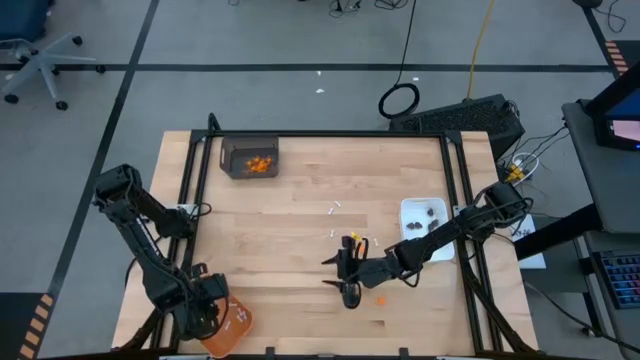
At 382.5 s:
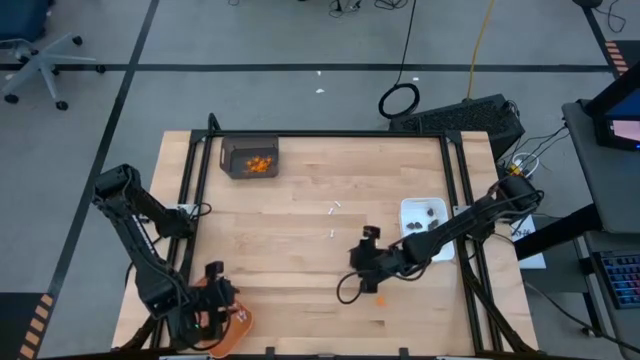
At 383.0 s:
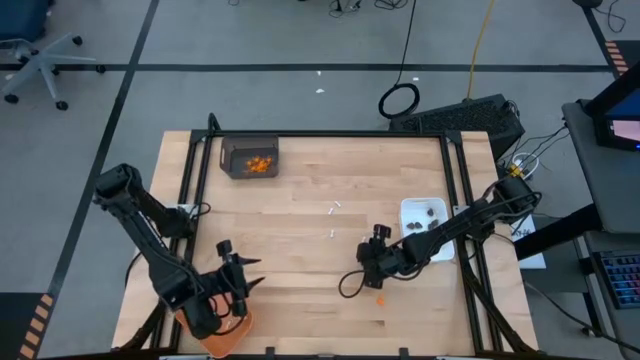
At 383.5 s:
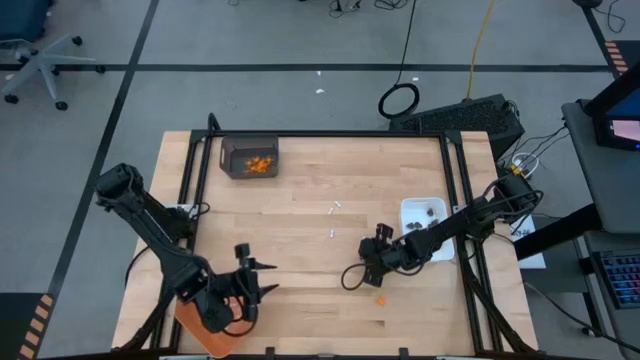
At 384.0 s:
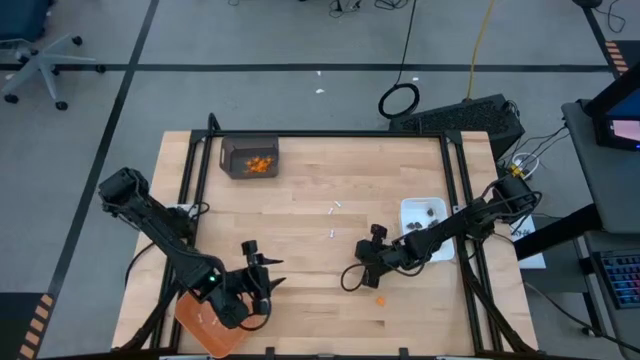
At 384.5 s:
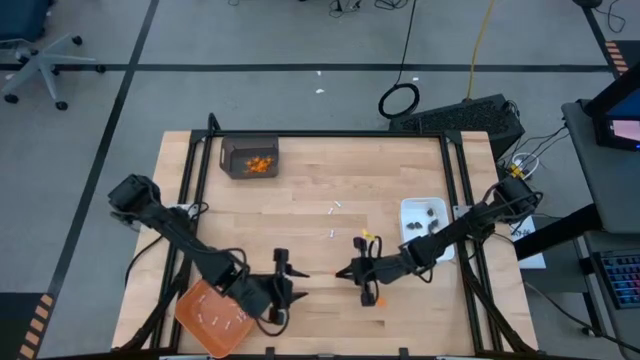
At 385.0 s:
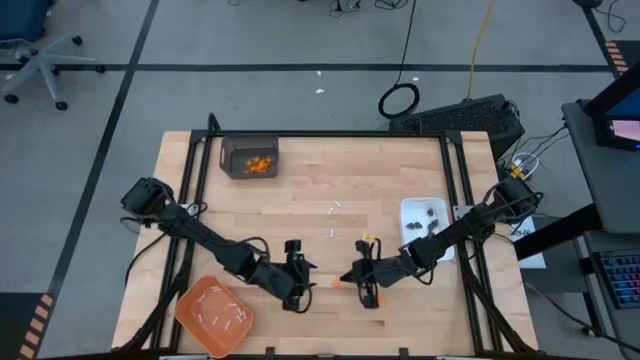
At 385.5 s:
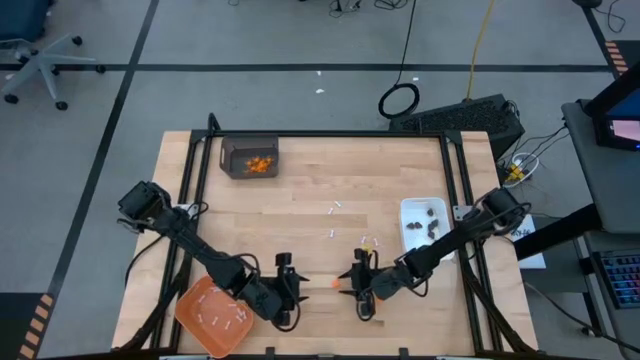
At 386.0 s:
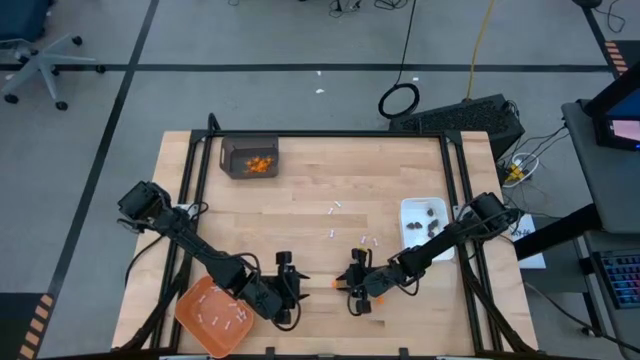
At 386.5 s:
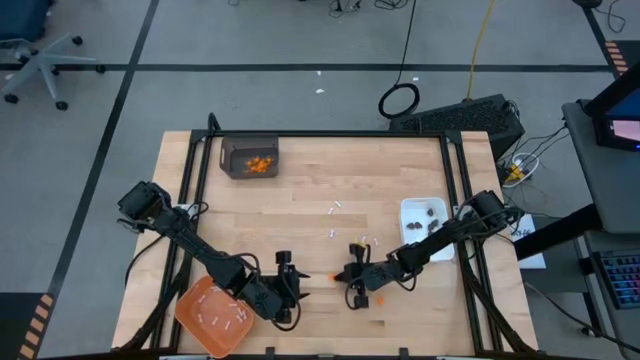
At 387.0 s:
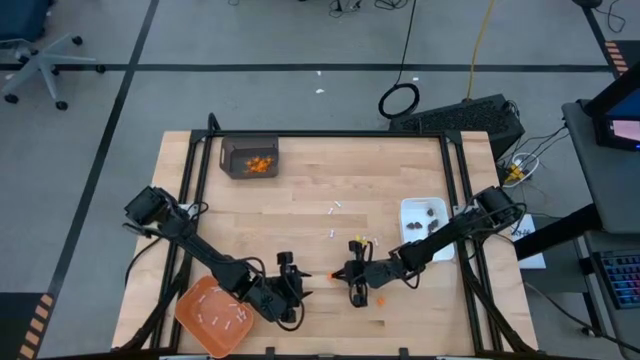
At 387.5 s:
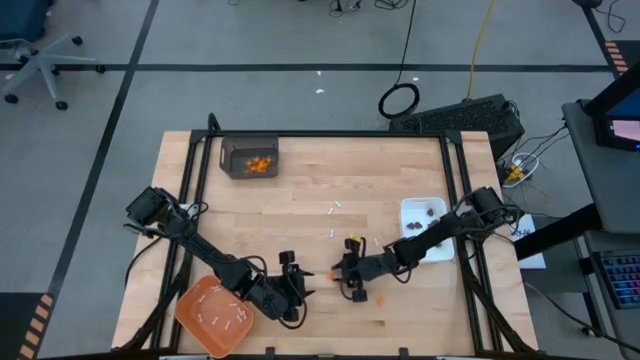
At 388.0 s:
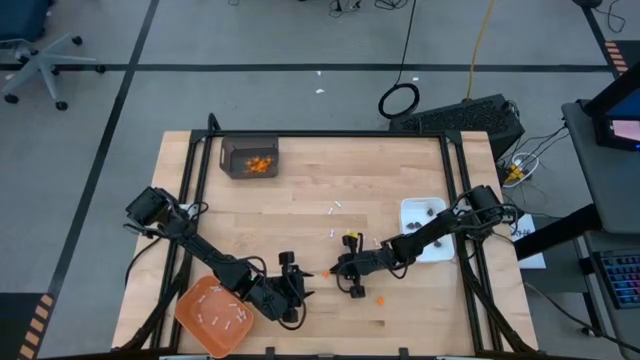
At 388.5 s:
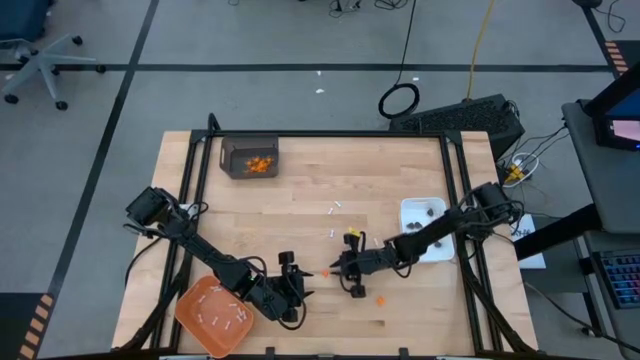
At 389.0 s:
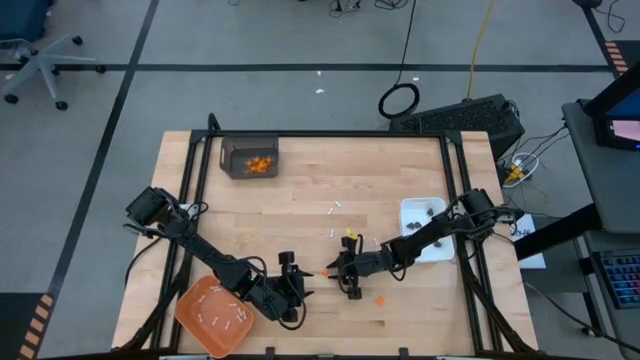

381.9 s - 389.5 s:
Task: Sort Halloween decoration
Put the orange spider toy into the black bin

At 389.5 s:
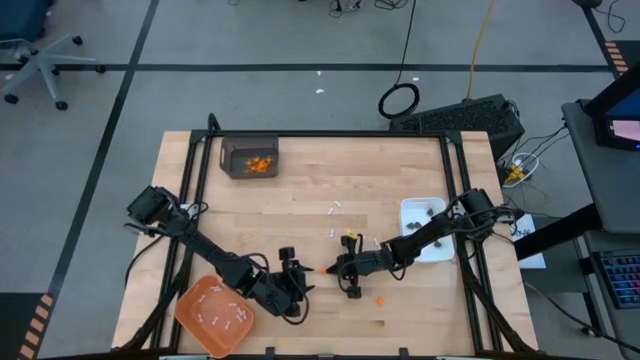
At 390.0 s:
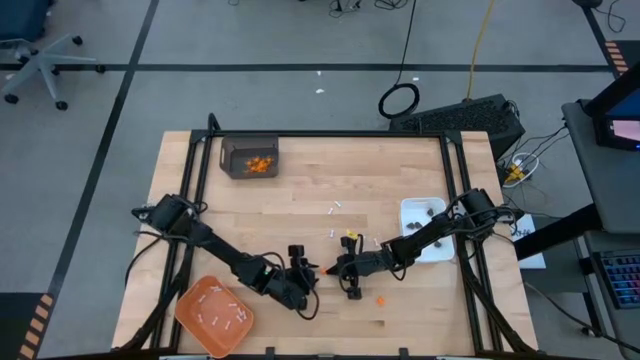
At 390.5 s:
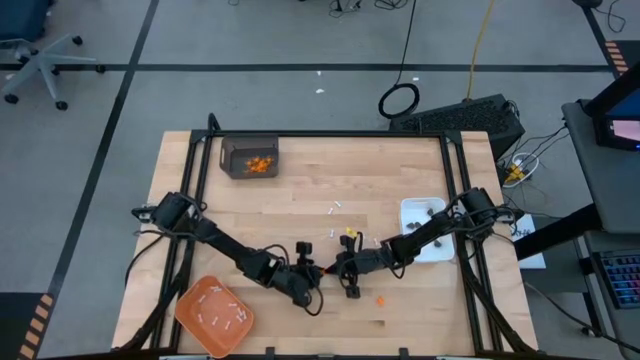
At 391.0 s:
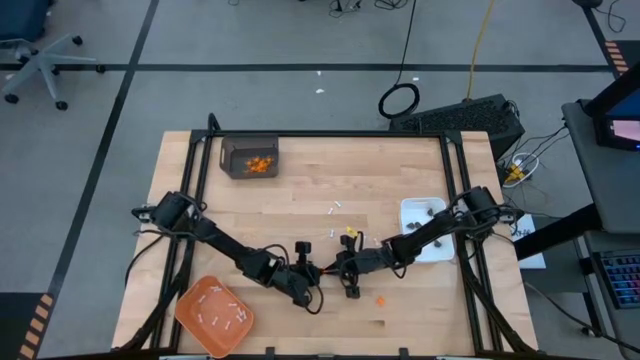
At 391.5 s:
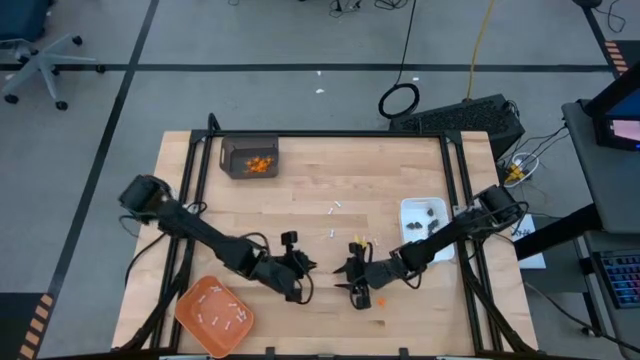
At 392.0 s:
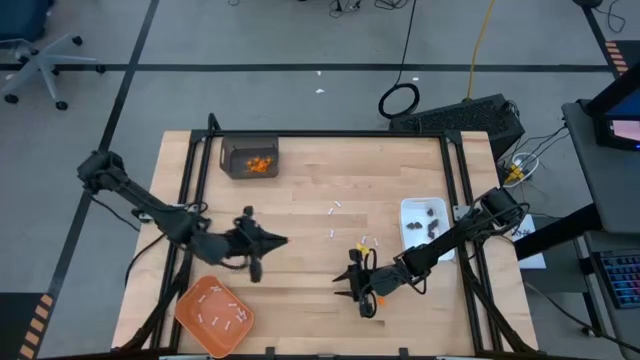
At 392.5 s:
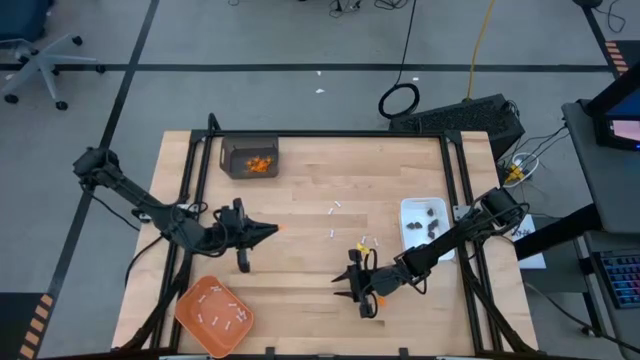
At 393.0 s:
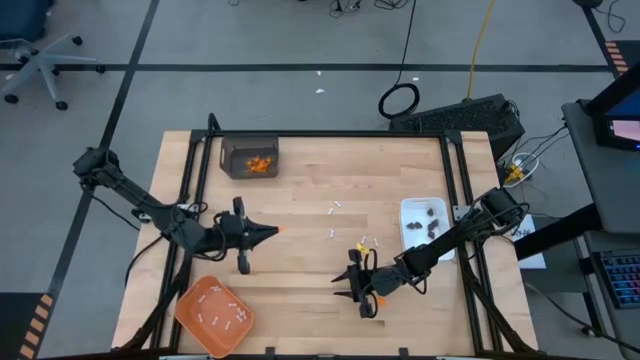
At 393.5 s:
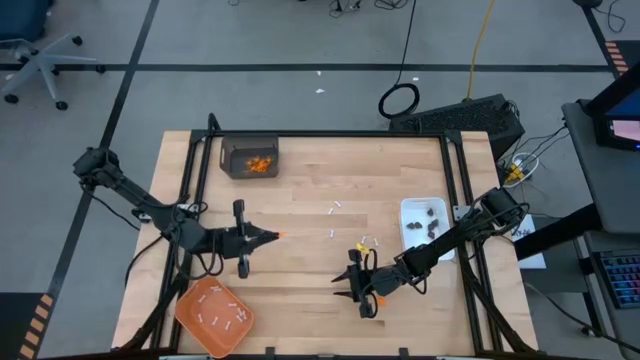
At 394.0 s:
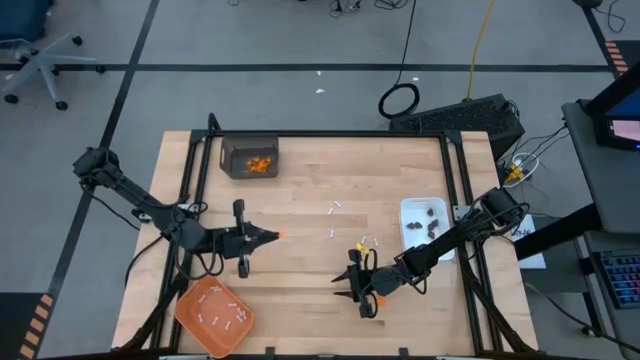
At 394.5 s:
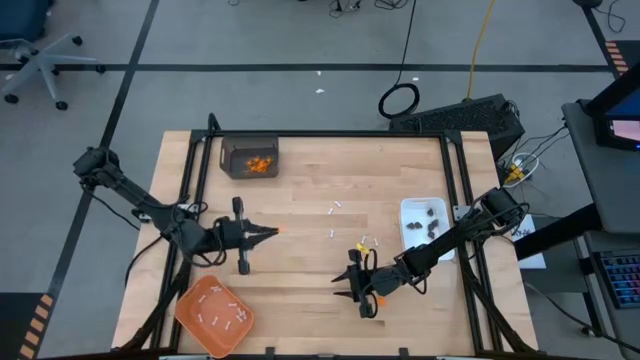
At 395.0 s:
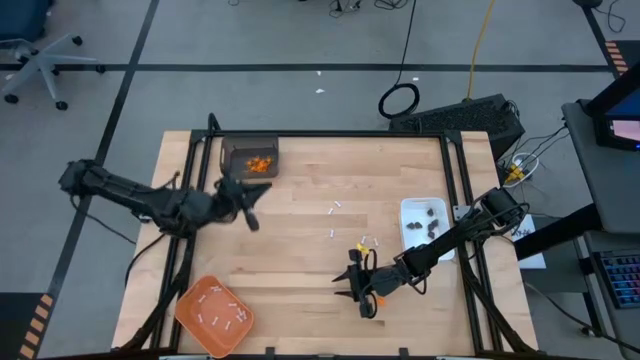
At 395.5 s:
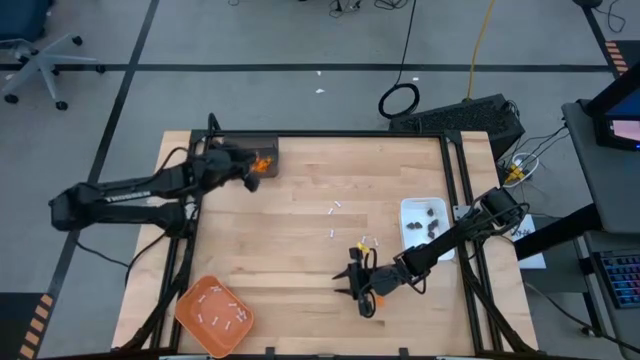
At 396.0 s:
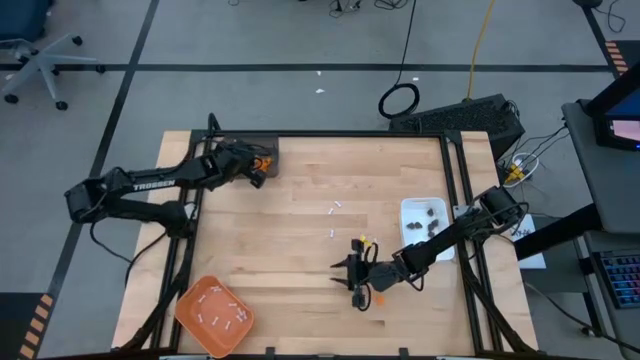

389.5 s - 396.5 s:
Put the orange spider toy into the black bin

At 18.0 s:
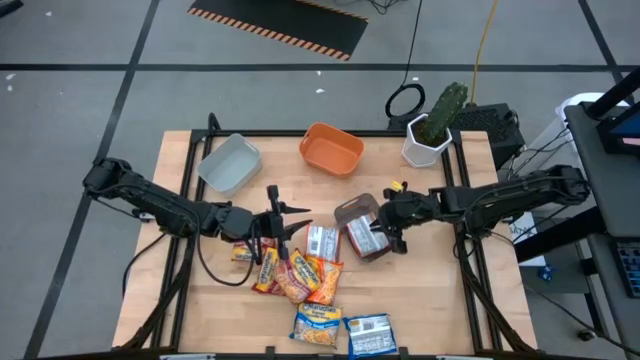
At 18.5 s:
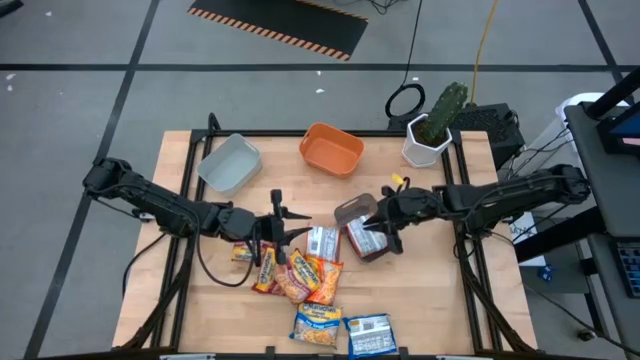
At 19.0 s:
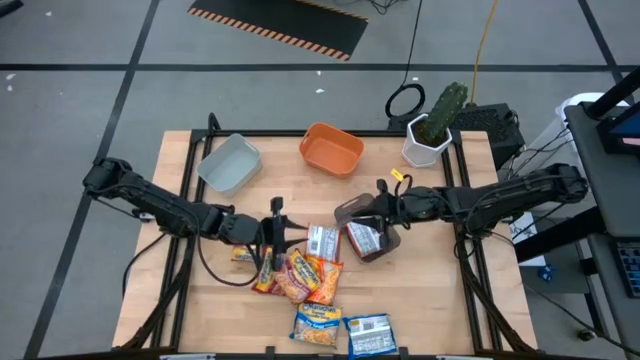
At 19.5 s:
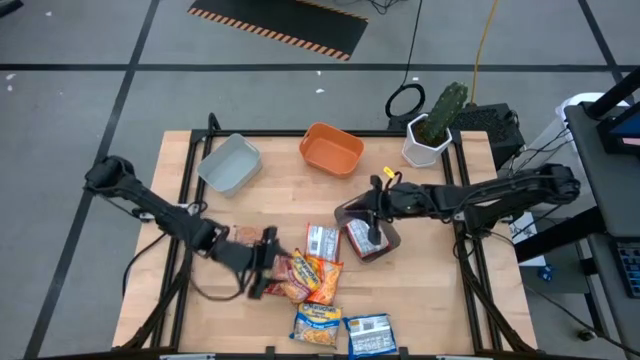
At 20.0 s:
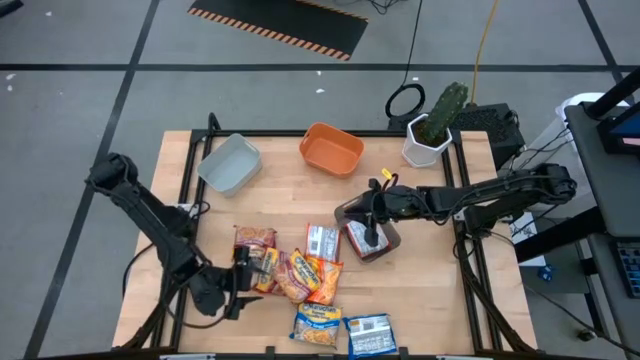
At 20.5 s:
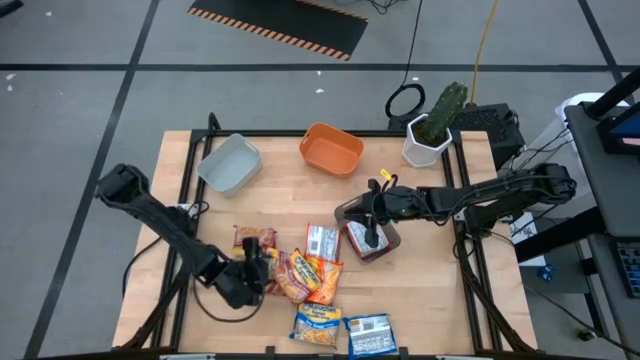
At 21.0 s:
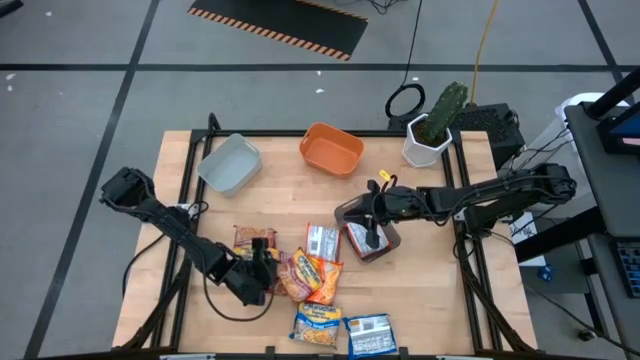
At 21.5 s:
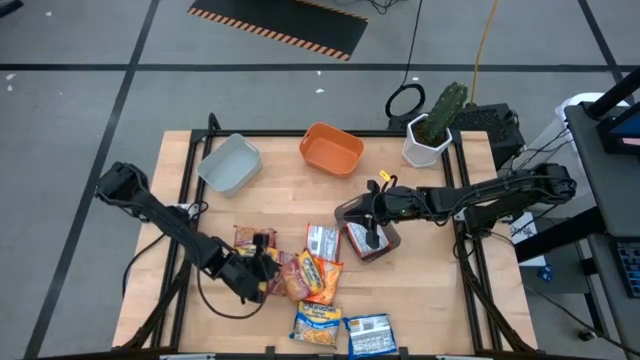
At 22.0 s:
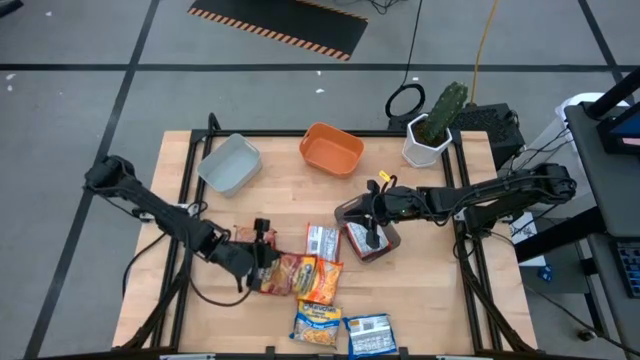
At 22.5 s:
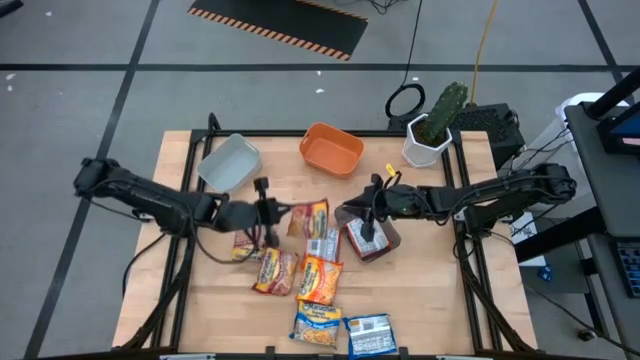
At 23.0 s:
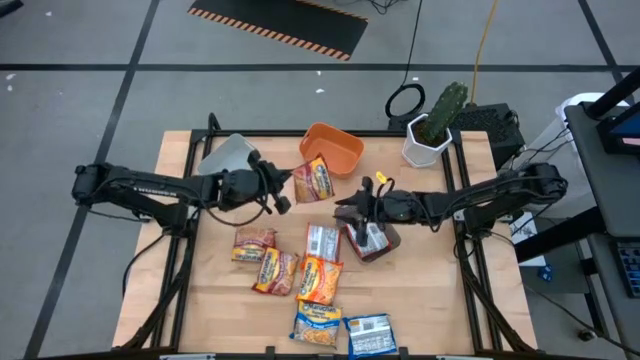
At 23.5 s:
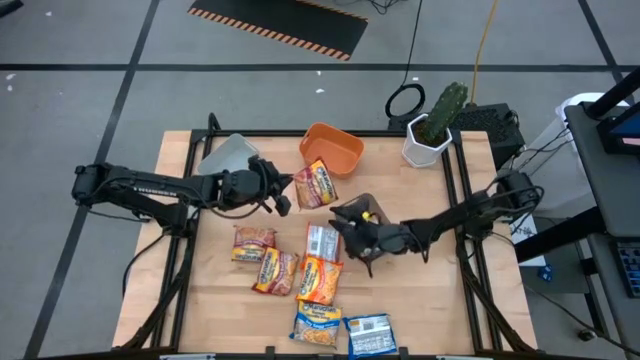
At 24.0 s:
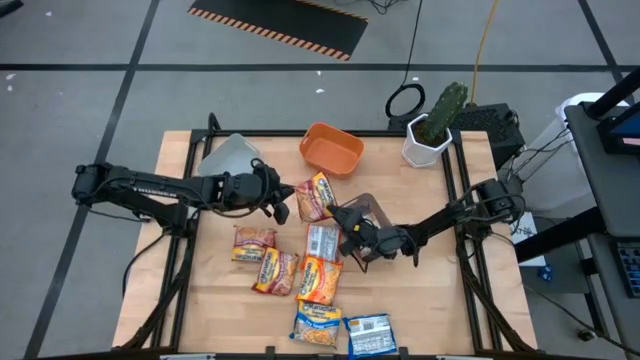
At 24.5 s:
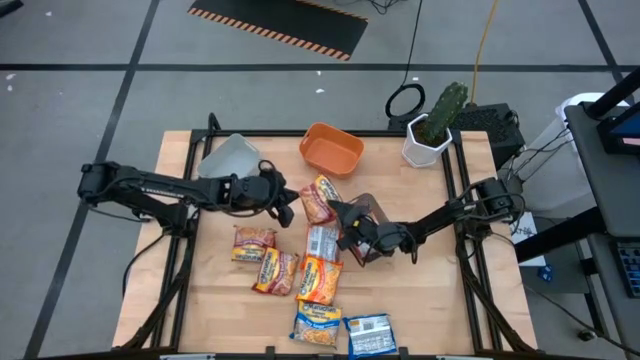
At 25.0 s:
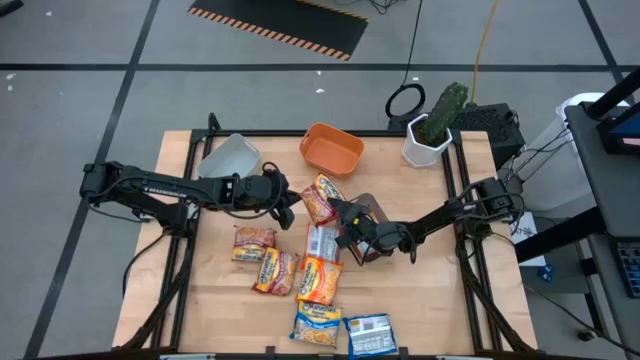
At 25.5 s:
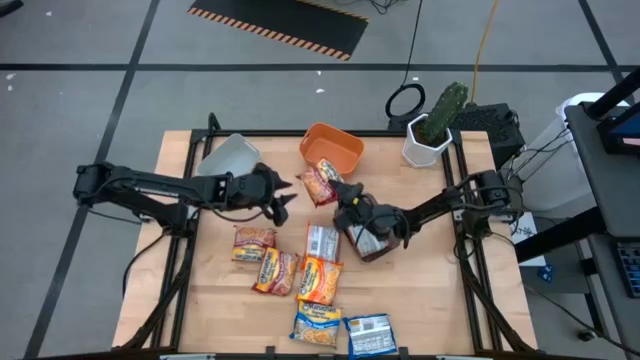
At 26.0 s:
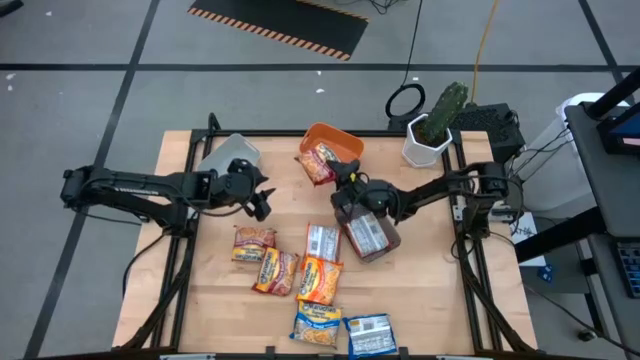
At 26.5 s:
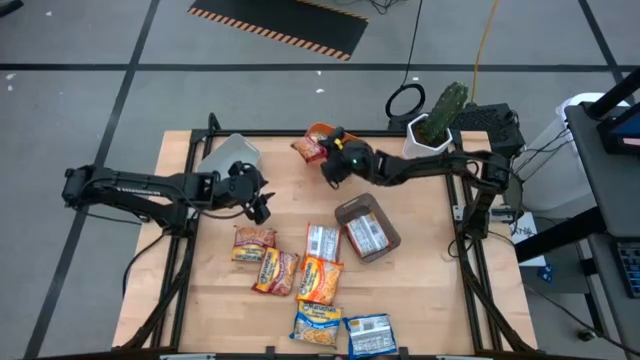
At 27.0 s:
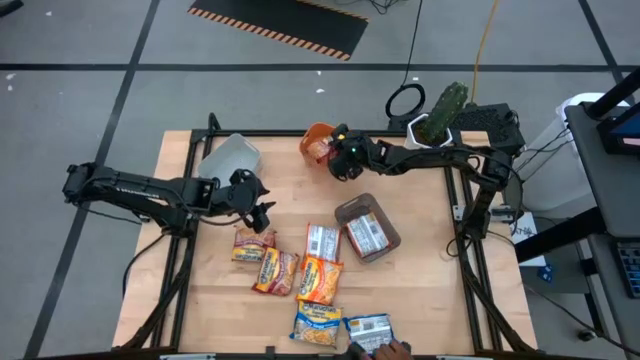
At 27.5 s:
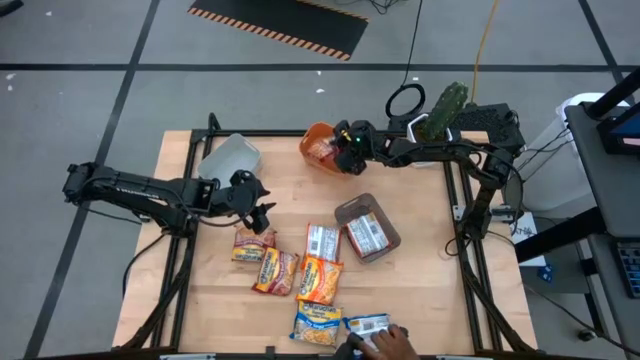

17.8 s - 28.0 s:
Task: Sort Maruchan noodles
Put the bottom right red noodle pack into the orange bin
